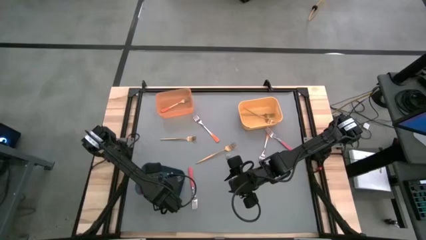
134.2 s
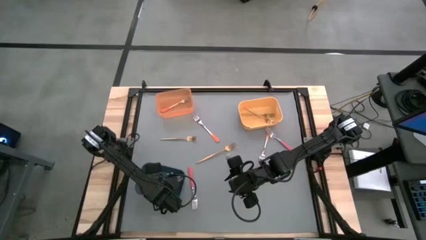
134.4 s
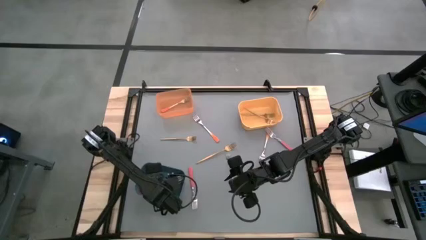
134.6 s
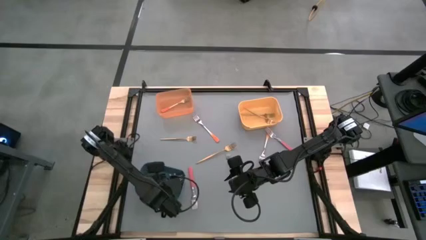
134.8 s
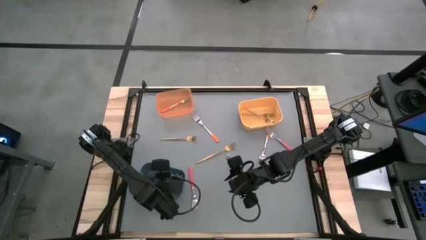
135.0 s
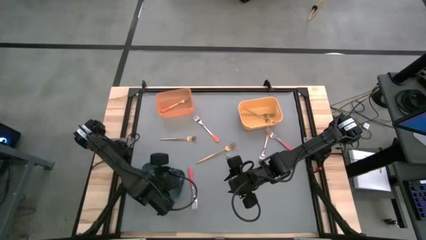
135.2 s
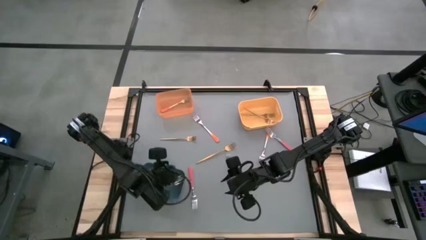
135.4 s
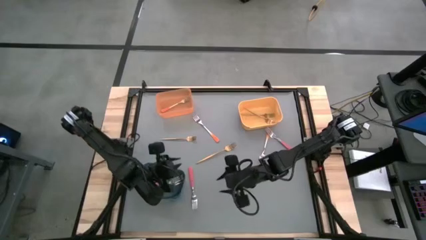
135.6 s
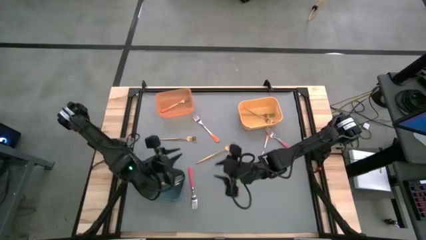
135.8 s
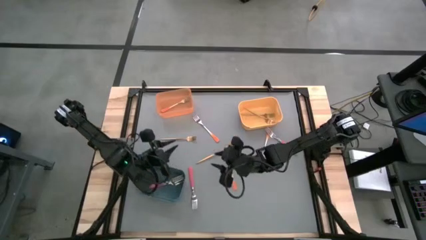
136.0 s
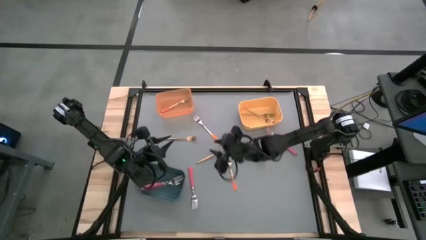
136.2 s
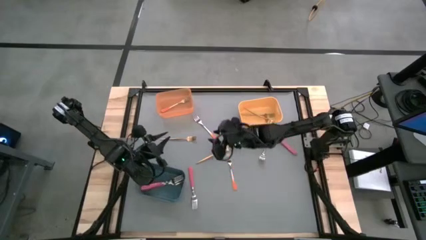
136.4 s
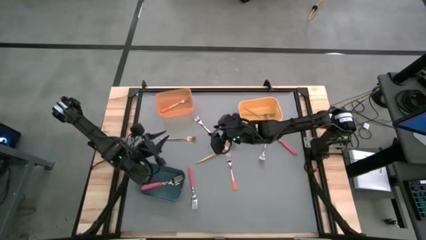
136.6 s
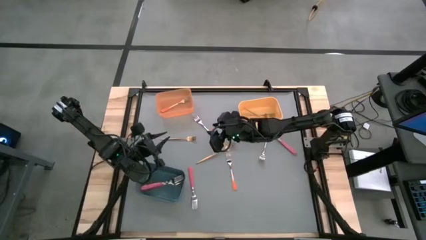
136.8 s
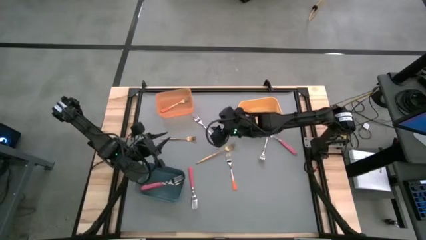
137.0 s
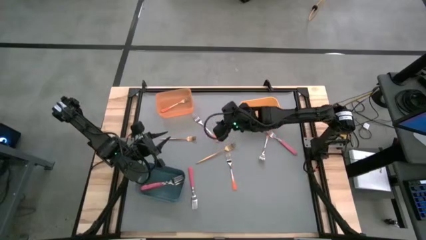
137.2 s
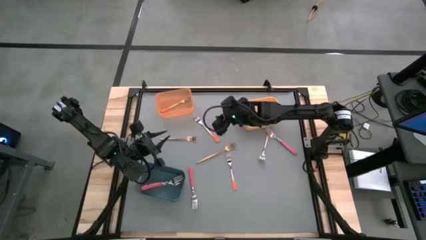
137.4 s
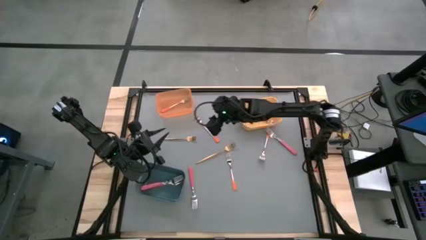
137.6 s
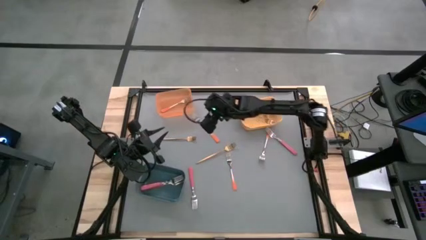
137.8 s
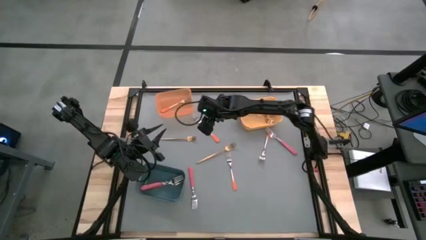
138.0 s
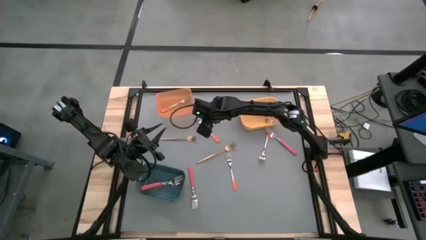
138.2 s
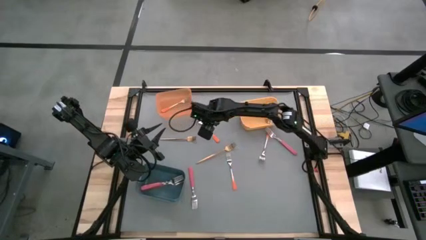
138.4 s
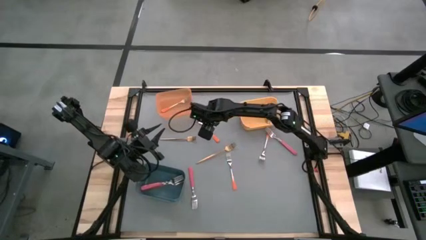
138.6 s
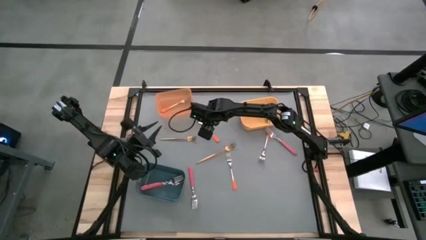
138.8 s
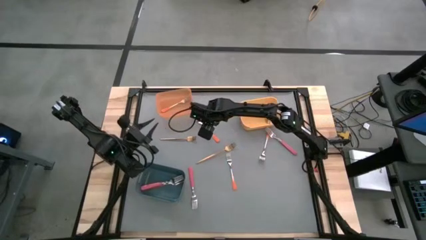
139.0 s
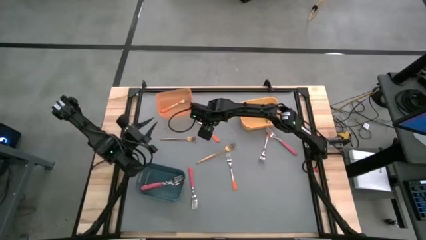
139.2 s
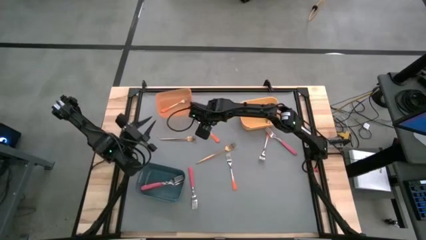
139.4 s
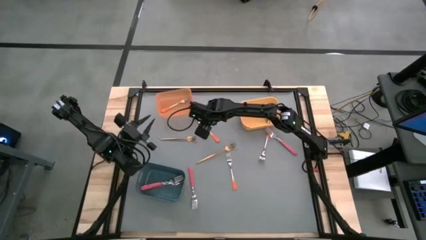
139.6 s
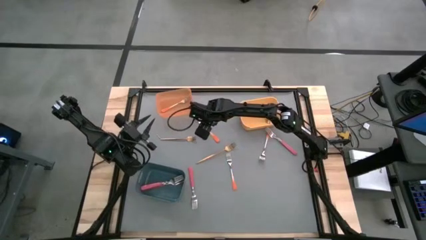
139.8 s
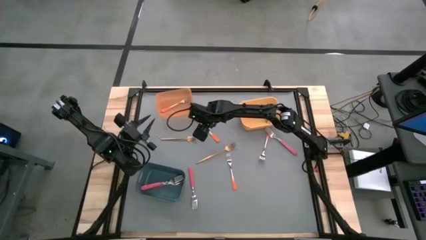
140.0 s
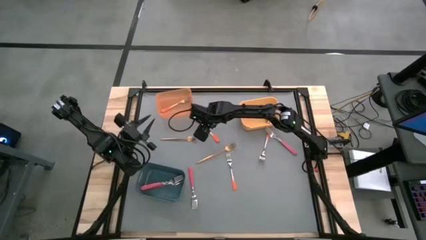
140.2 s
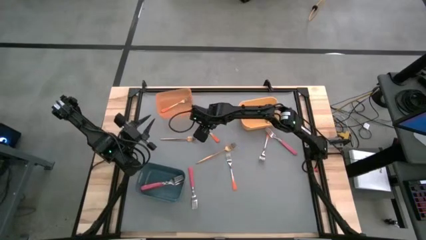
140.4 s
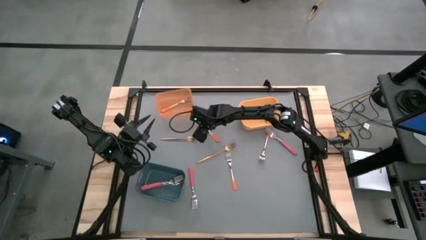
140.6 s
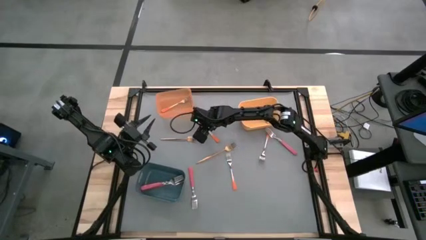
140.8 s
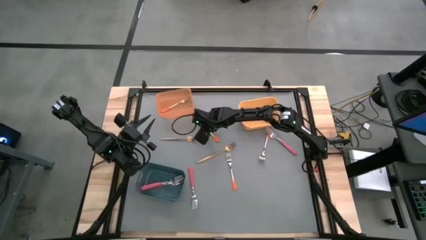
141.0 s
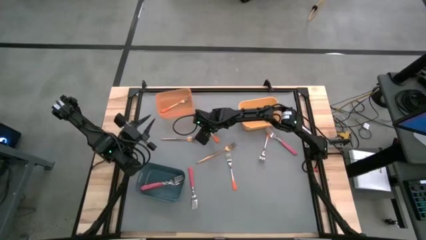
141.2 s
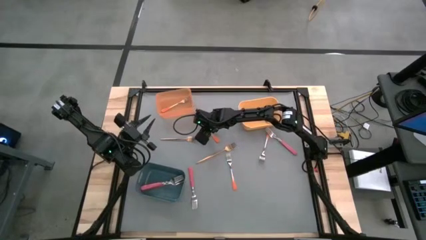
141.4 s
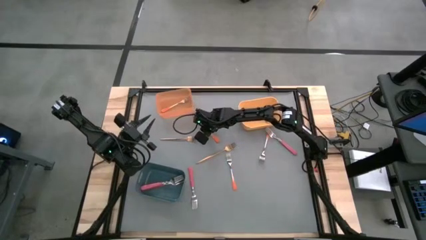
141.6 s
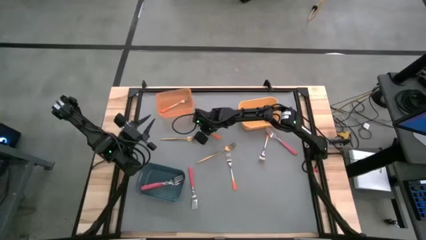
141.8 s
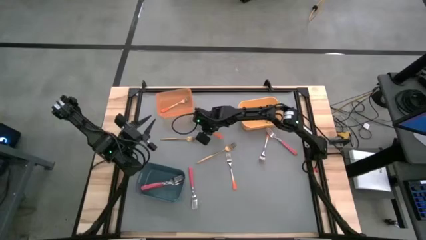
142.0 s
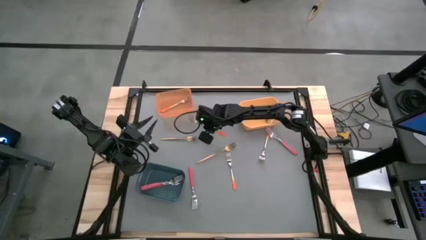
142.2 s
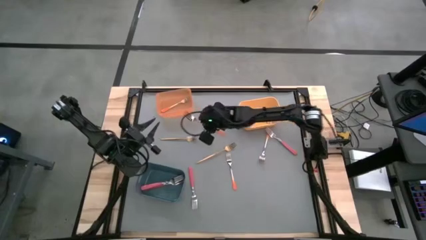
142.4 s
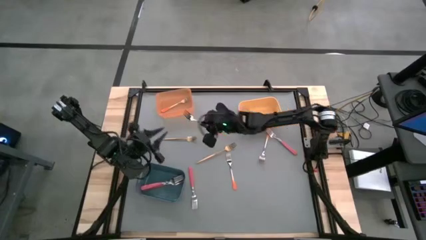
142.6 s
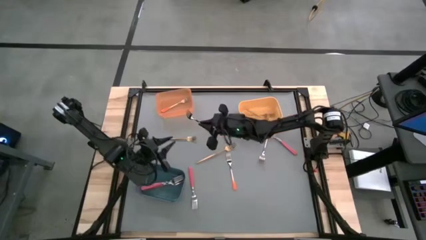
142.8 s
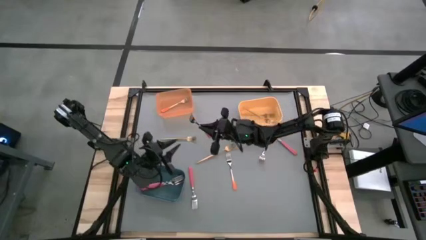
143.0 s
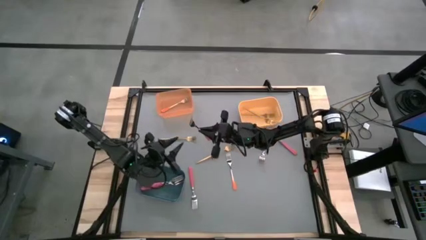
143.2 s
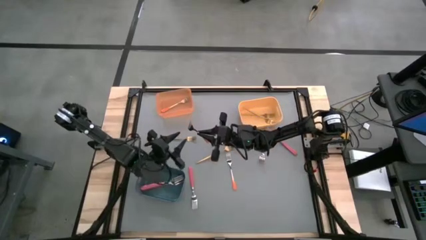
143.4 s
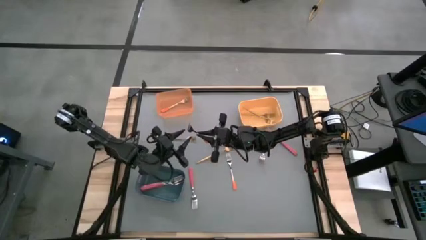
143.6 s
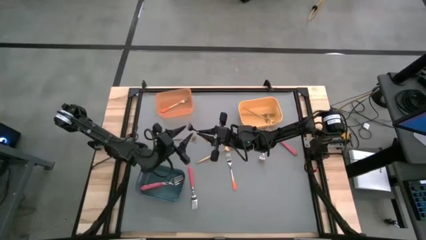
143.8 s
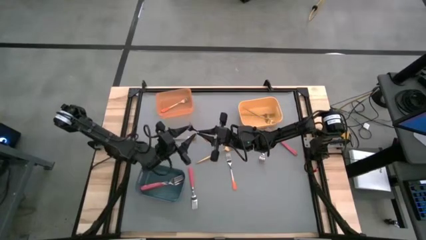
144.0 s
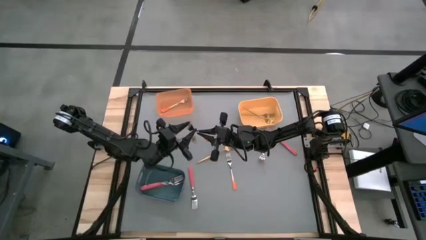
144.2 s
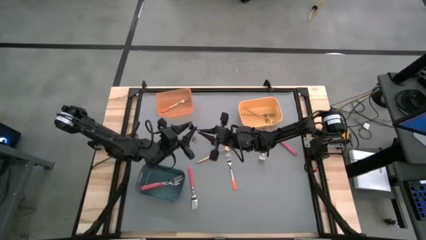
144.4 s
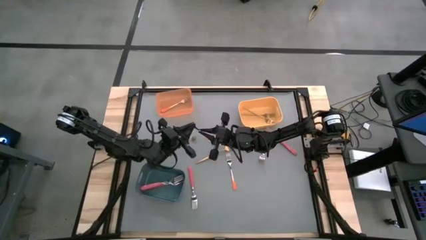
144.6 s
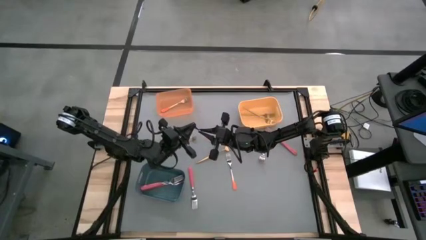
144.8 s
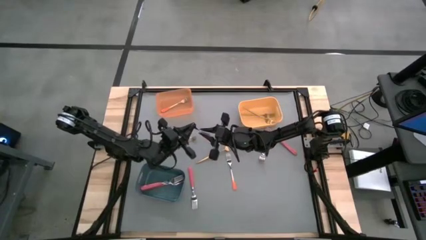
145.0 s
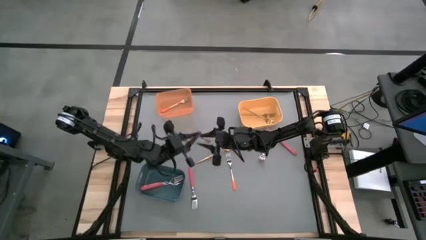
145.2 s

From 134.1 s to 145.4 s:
Task: Sort silverware by color (type)
Put the orange fork into the orange bin
